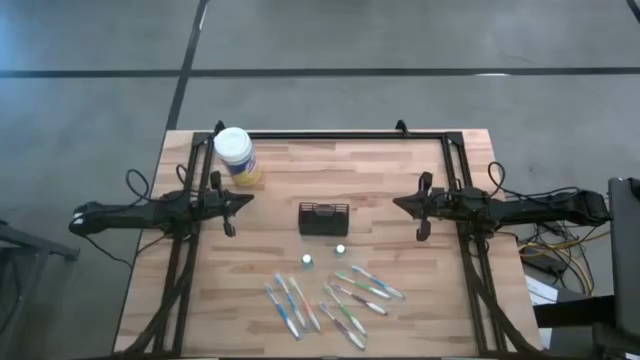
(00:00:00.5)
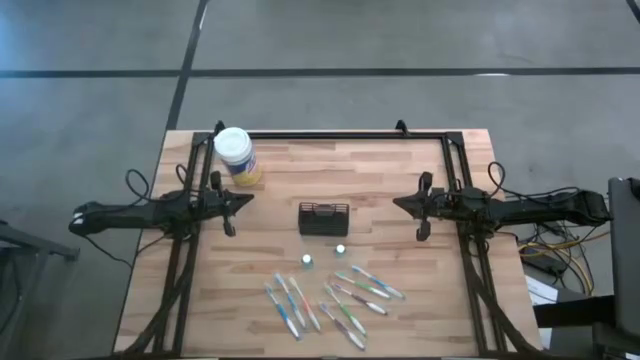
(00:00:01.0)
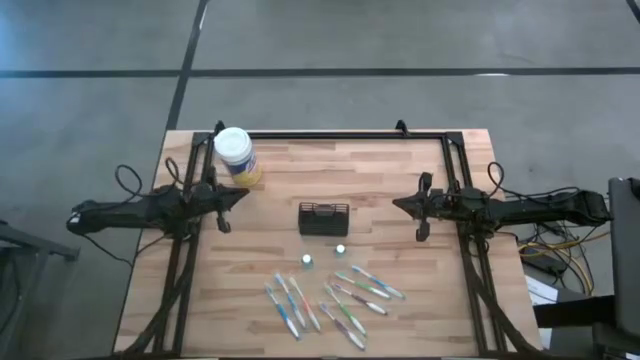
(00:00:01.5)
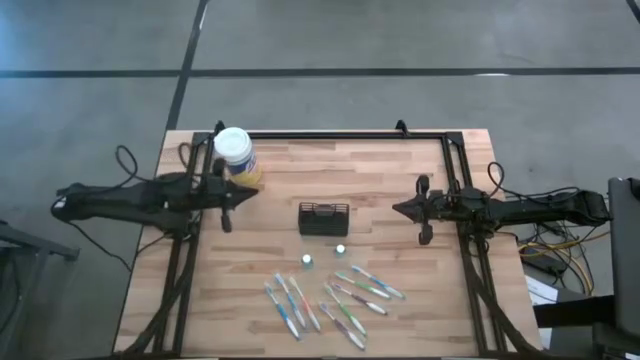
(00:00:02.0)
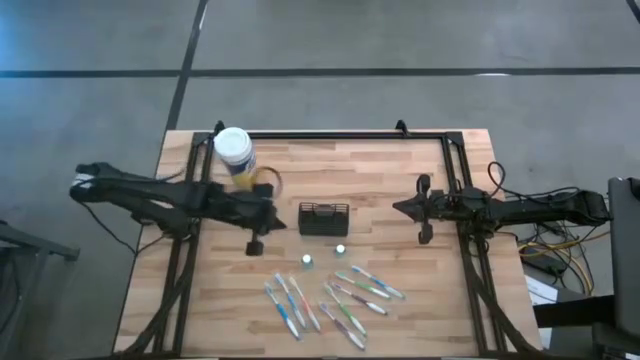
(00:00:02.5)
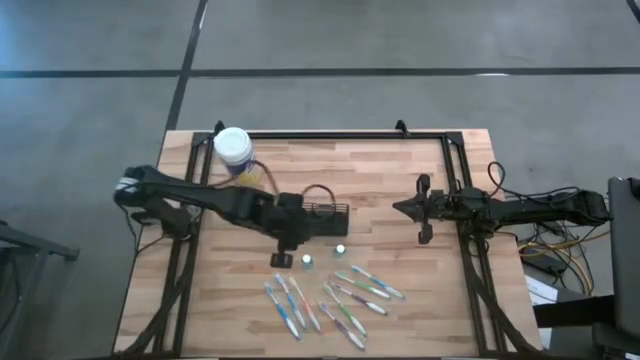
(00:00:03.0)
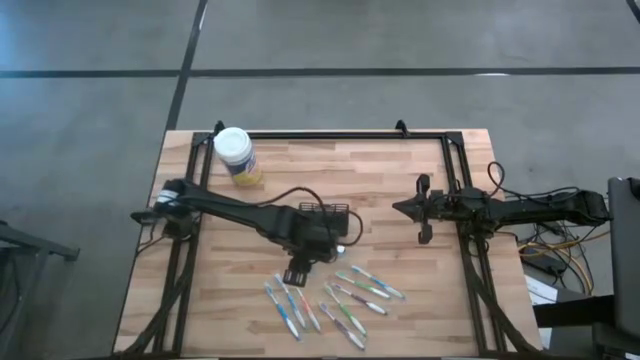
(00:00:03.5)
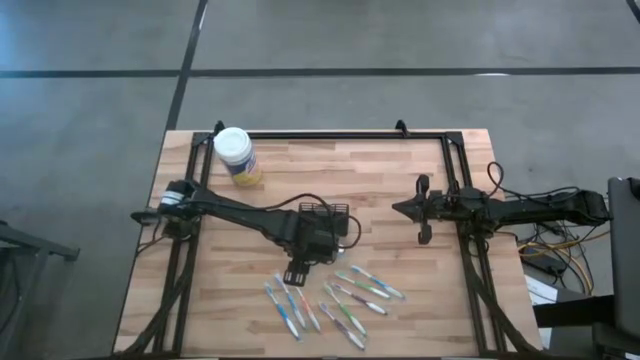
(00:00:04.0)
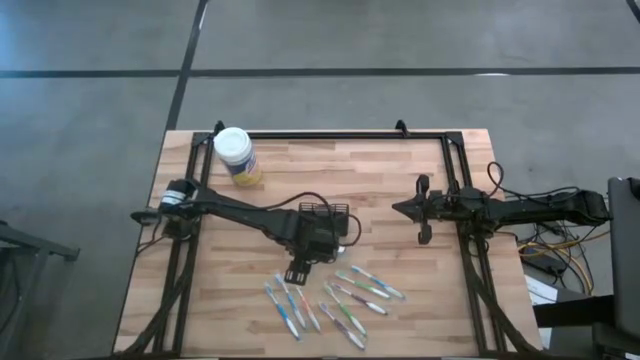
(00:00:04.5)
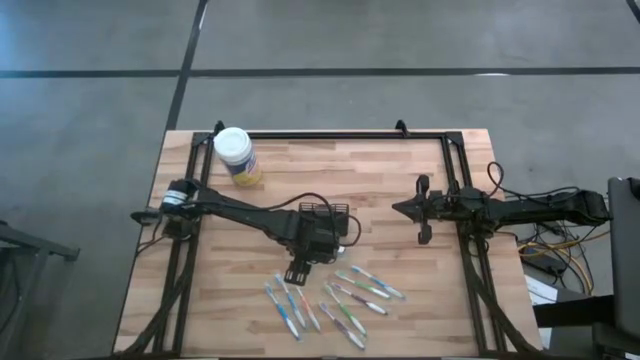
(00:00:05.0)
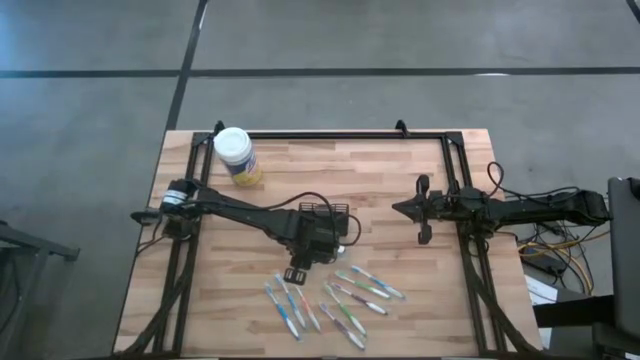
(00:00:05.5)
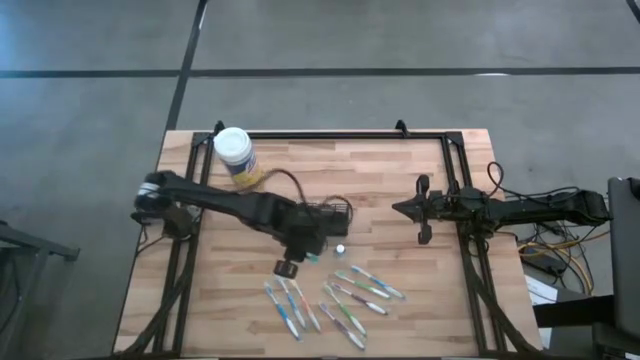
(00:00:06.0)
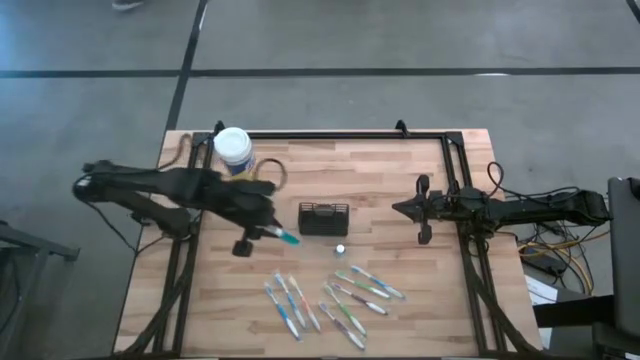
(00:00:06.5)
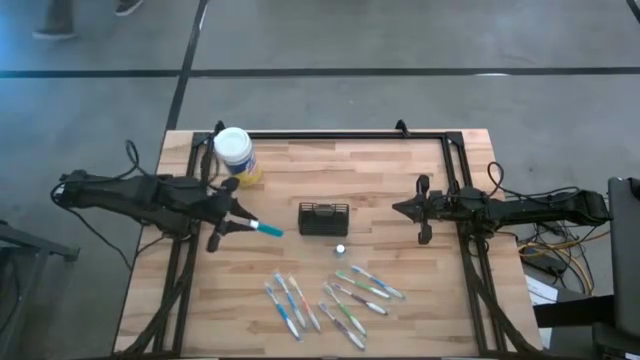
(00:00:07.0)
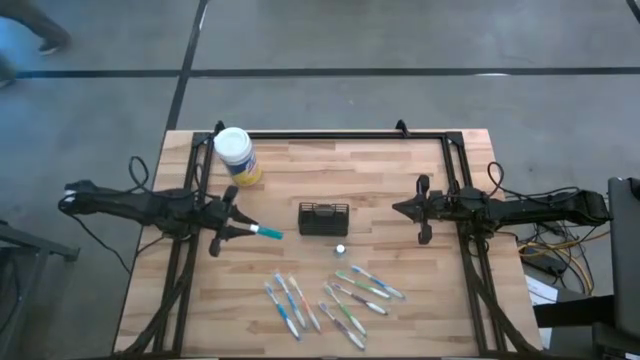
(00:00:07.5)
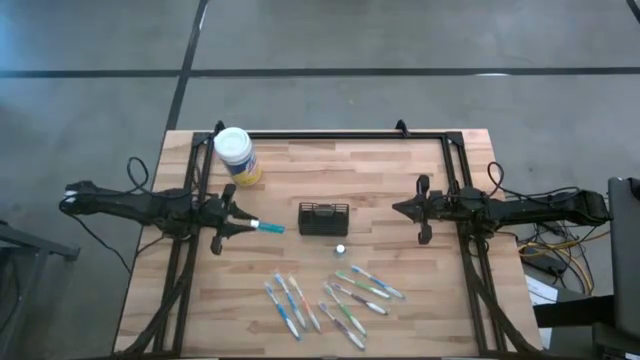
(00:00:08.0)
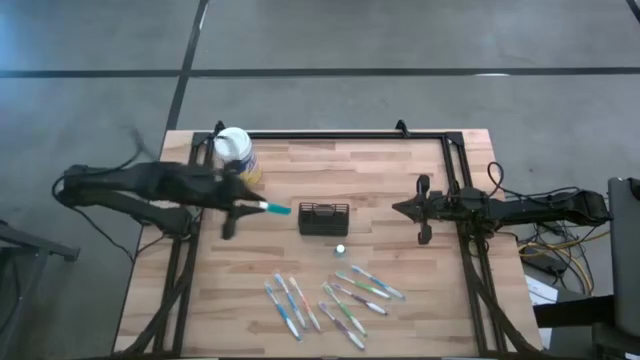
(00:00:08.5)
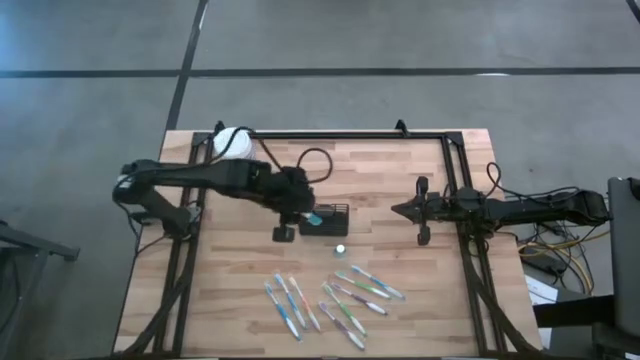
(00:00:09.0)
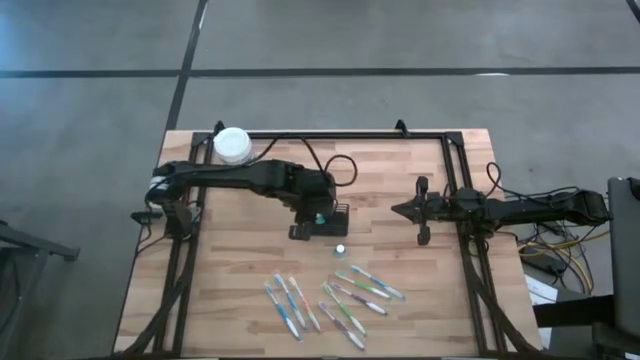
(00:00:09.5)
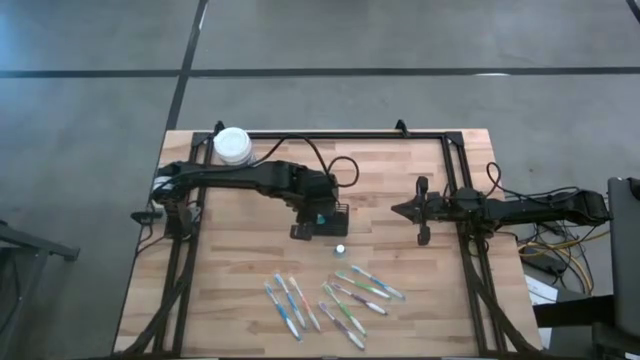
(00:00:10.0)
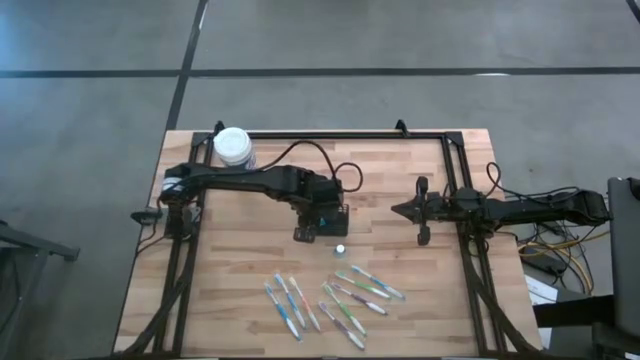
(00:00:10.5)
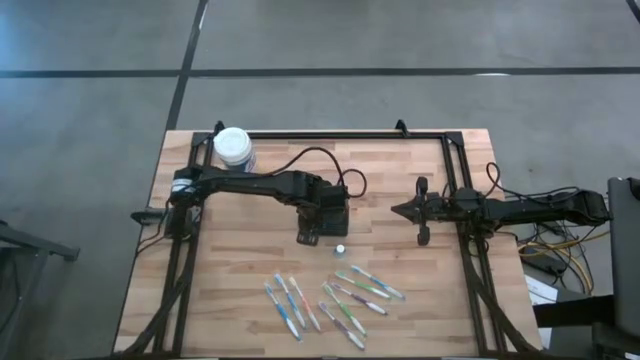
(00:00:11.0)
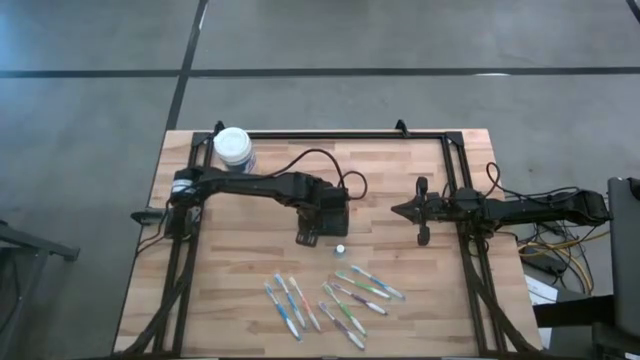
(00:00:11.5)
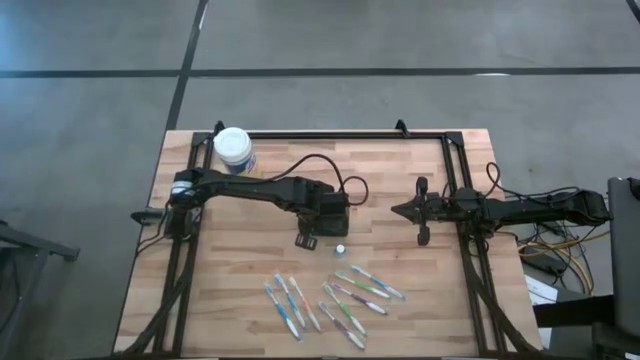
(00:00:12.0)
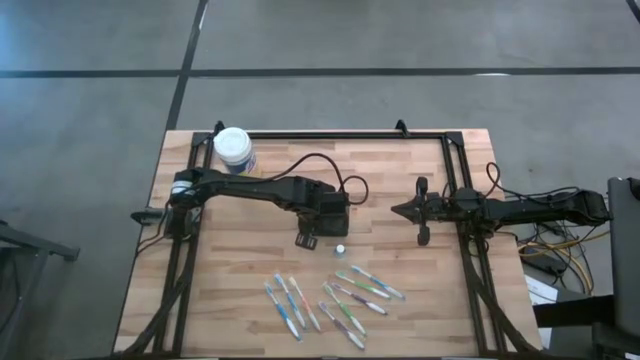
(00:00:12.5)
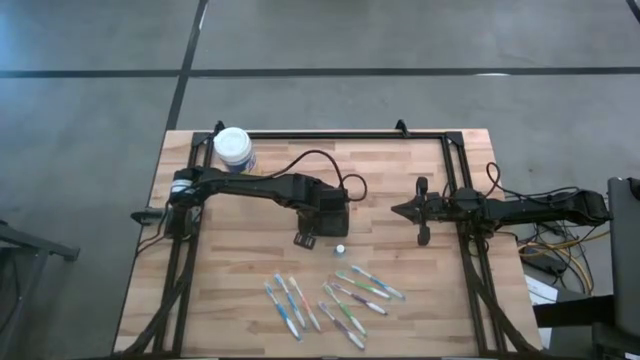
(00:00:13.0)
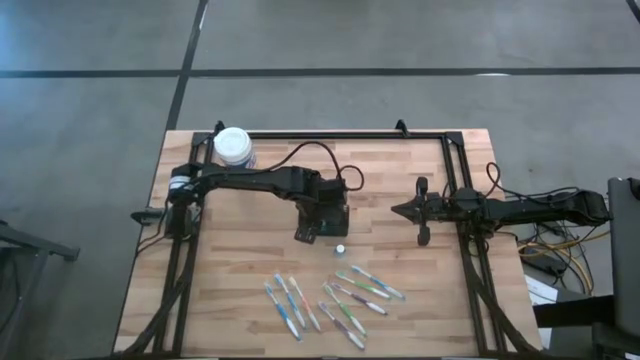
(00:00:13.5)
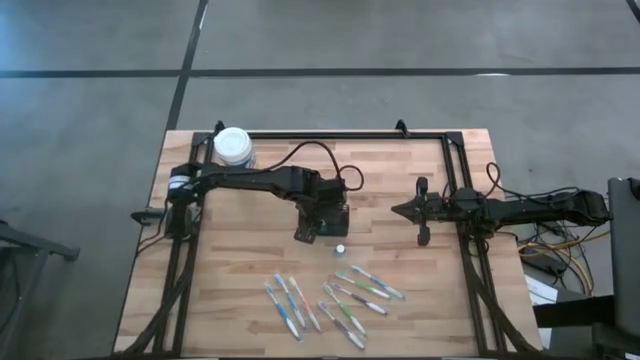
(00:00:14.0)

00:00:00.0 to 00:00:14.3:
Task: Pick & Place toothbrushing station
Put the left blue mouthwash into the wire organizer
